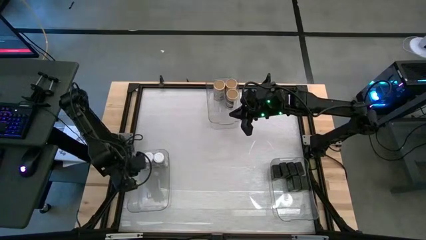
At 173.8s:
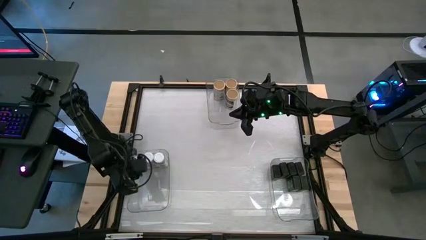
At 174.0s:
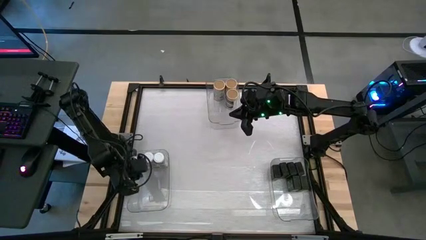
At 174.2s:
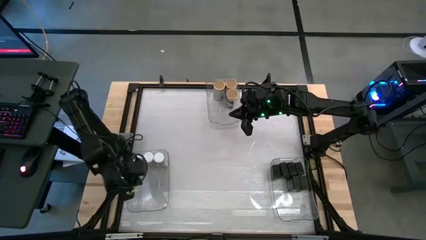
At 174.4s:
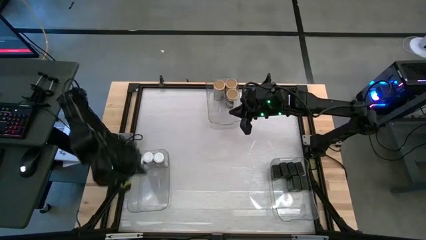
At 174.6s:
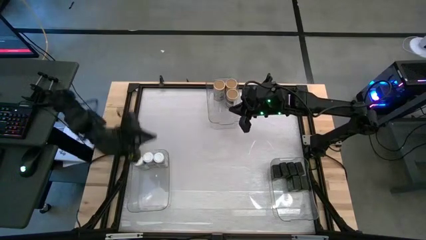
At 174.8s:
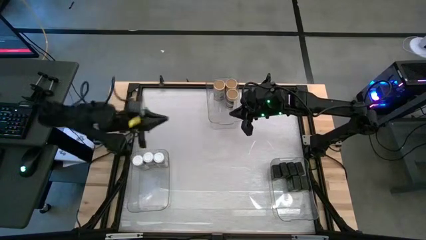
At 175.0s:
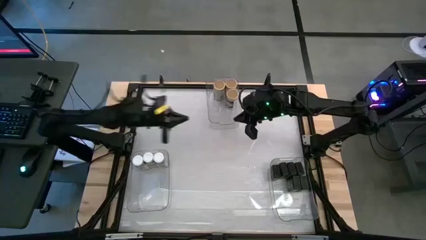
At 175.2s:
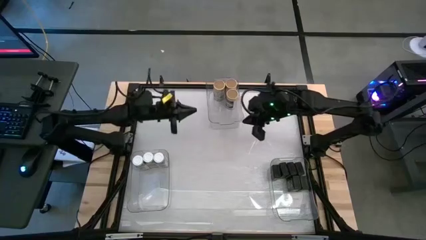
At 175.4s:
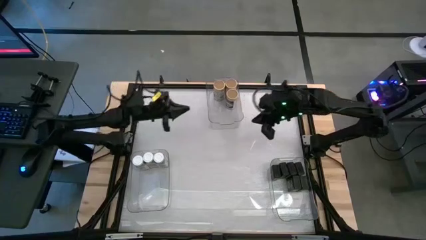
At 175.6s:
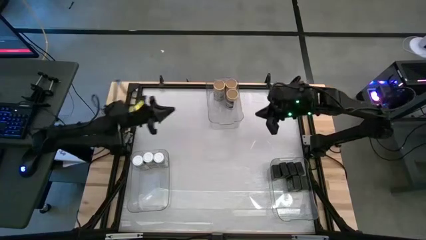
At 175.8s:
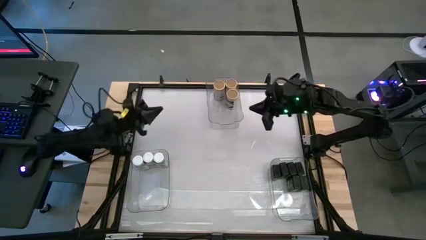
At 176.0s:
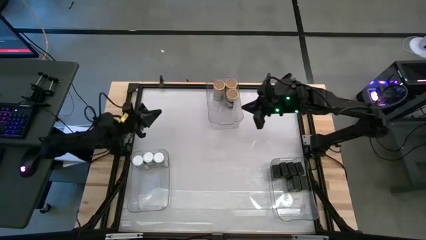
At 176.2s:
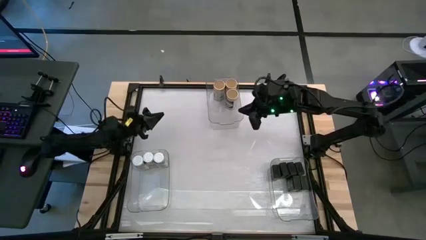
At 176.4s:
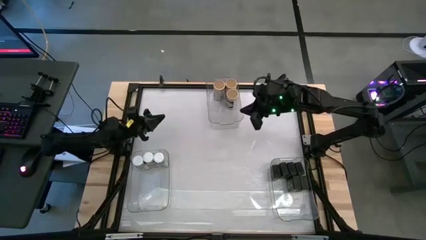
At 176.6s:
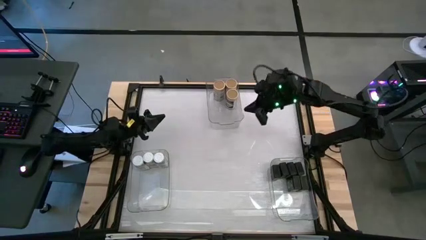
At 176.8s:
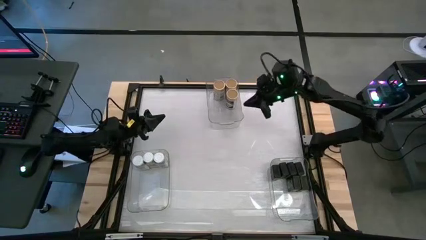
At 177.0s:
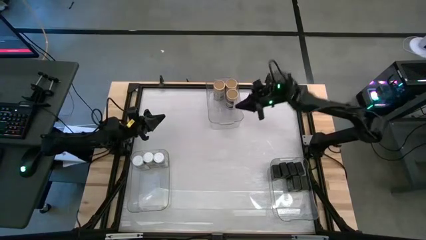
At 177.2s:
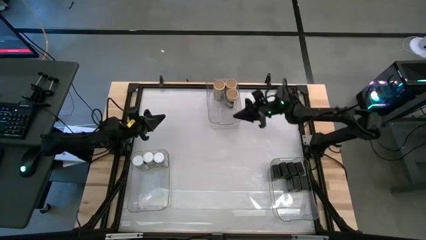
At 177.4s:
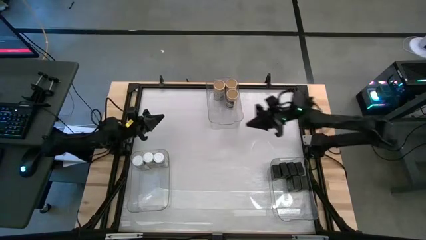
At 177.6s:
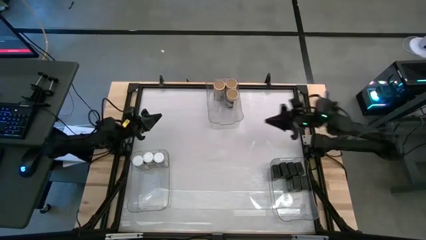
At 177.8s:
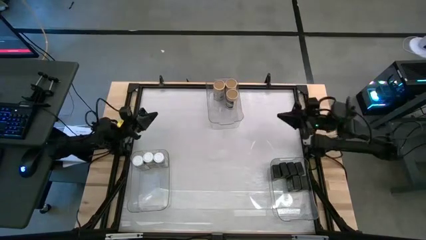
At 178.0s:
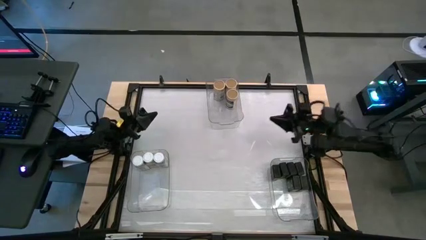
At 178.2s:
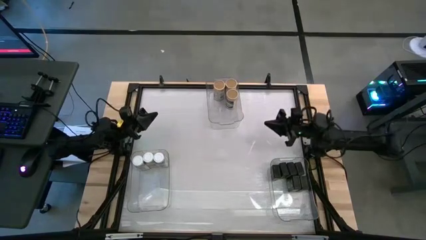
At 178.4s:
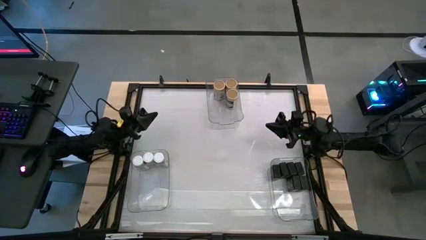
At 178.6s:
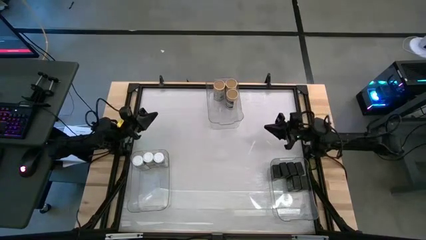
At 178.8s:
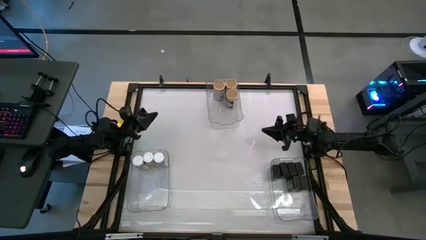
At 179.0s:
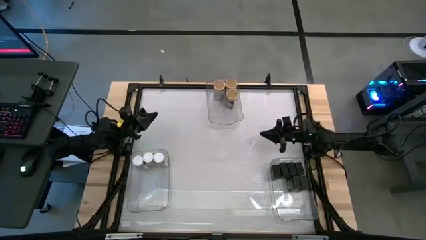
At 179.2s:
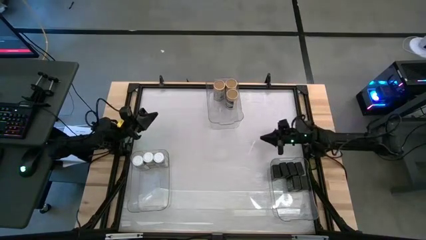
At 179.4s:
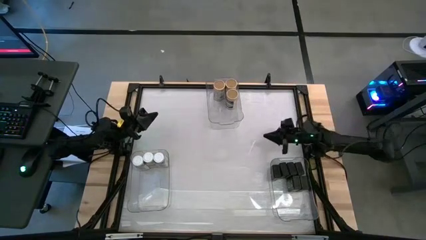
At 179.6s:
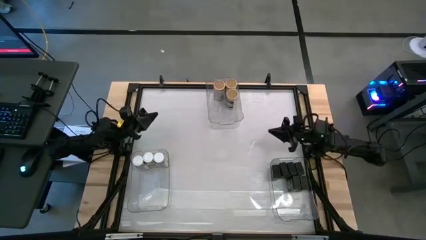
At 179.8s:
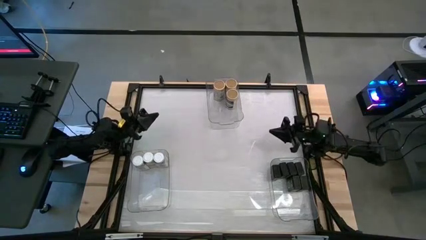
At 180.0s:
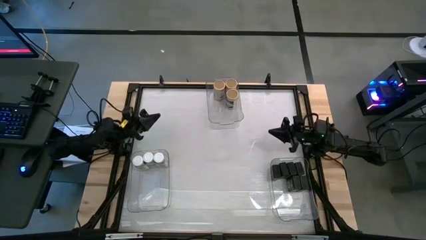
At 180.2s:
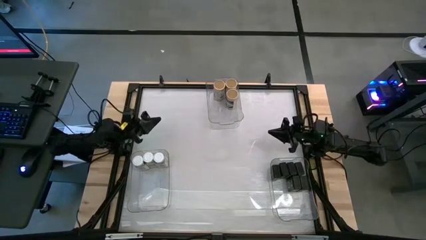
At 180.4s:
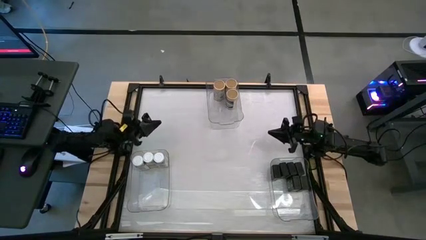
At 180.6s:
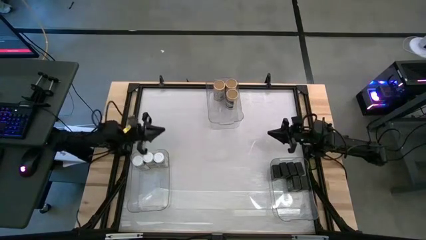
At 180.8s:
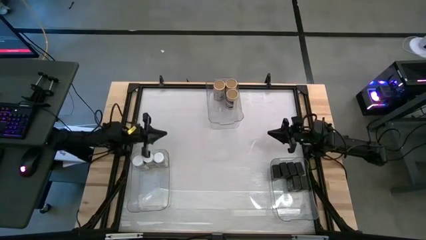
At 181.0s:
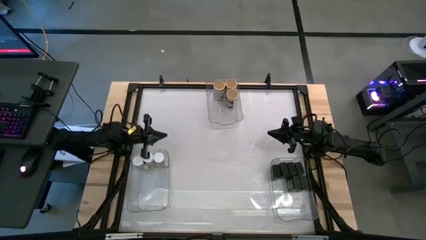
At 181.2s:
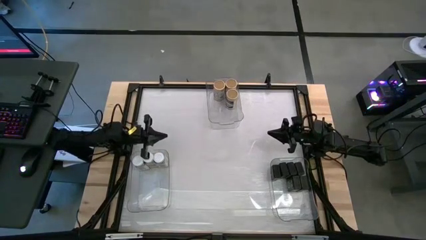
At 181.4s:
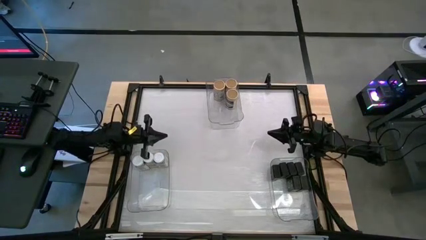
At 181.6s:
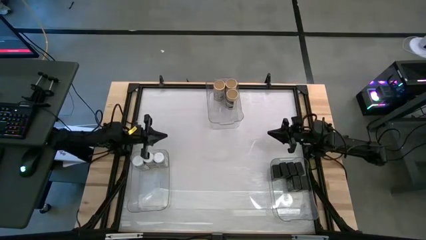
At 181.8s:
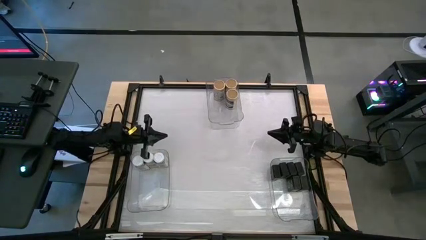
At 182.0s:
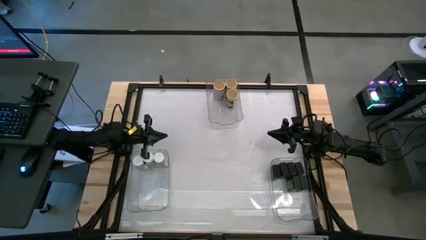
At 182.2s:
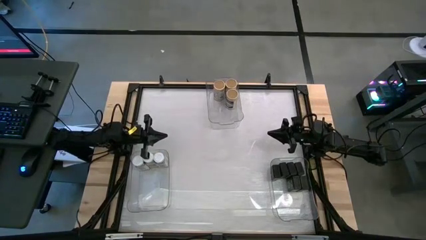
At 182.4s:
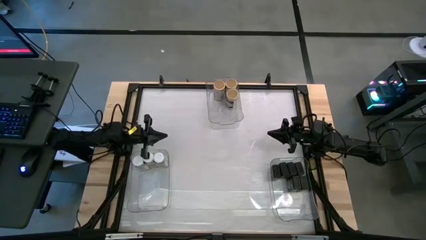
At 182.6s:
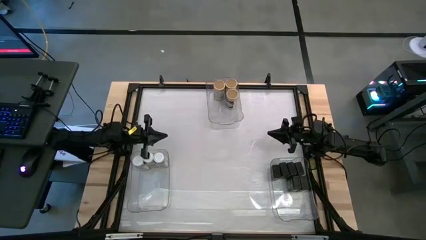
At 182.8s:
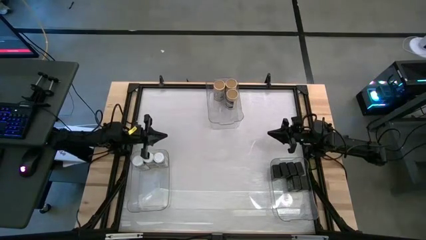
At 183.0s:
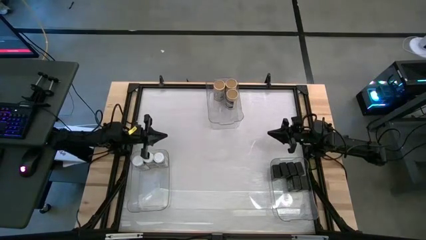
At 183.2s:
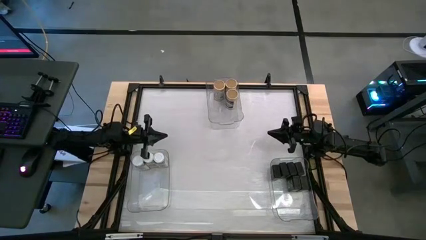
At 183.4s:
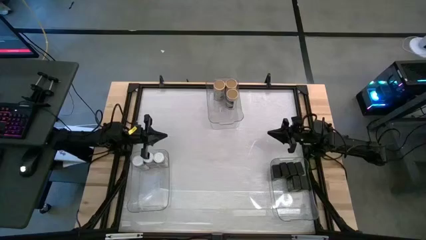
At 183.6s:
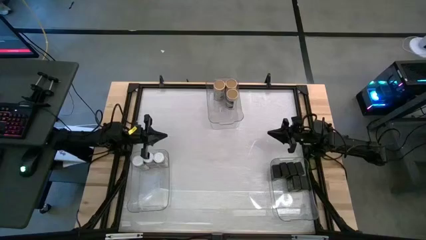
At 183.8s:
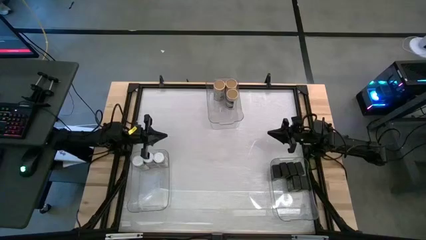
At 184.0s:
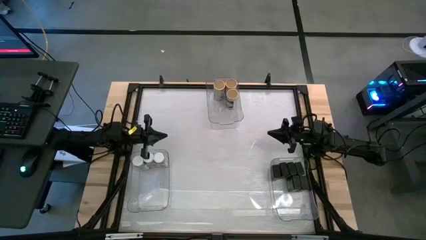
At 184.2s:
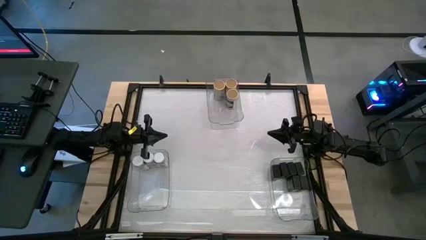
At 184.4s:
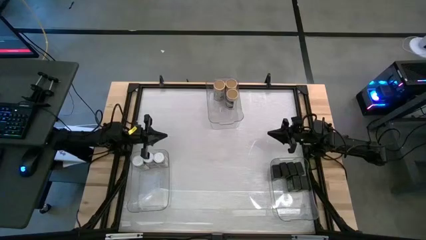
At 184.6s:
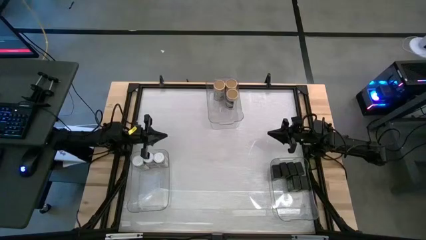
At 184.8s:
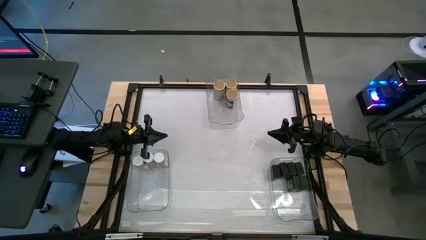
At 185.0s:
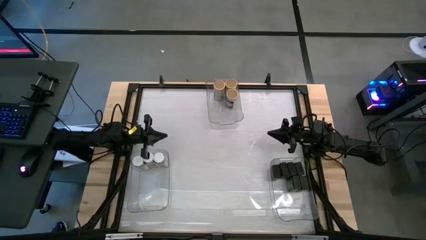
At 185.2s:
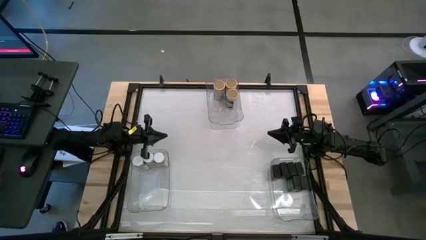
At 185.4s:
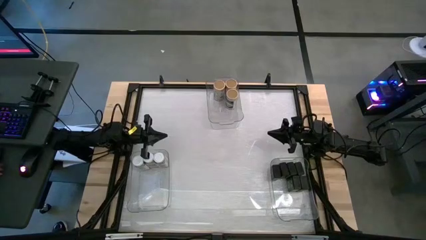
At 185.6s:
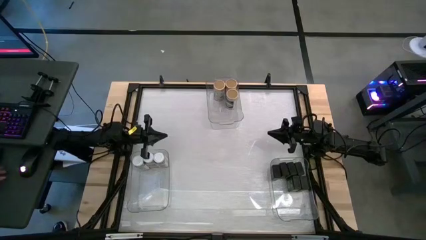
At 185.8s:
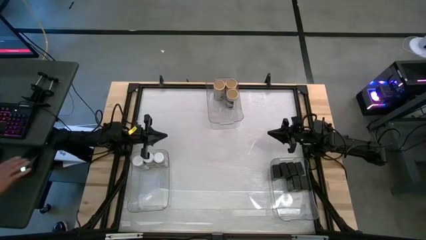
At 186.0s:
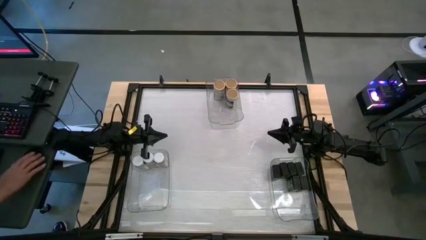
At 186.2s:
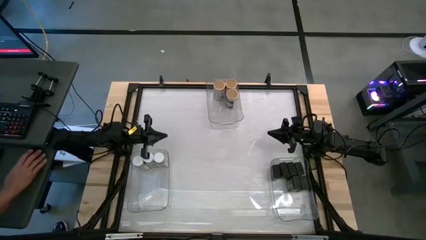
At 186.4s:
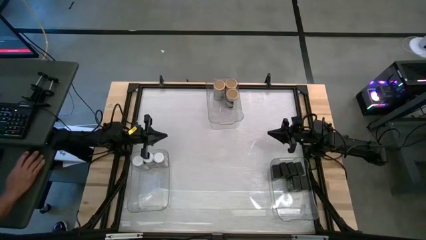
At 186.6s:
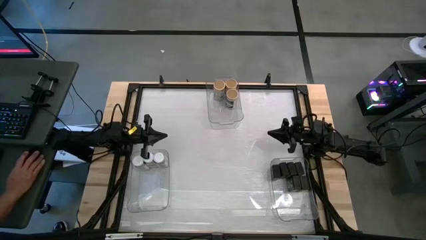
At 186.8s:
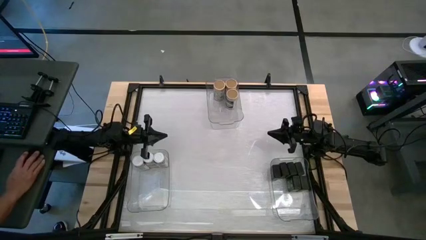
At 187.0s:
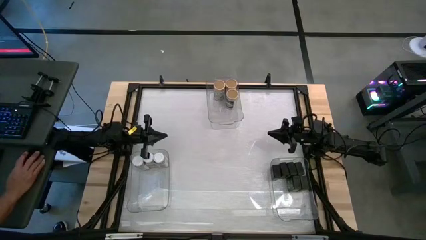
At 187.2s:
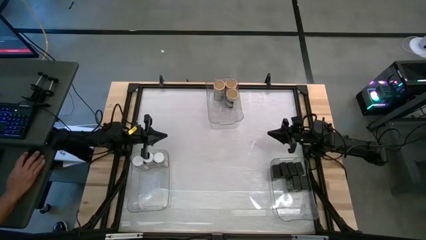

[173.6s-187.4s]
Task: Sort spices by type
Return to Home Position

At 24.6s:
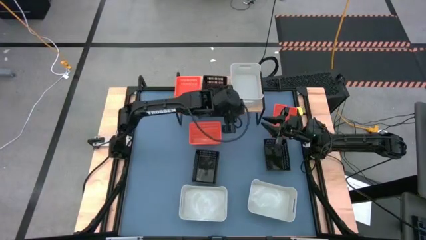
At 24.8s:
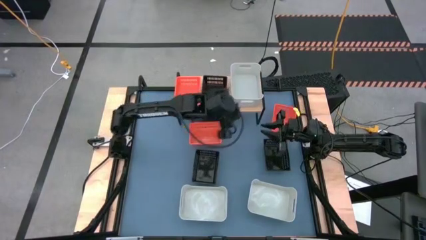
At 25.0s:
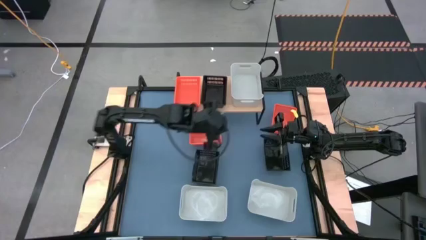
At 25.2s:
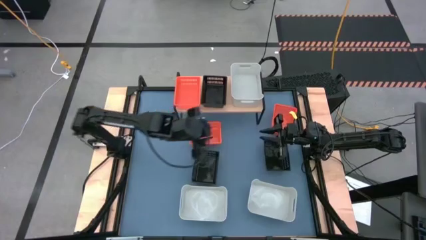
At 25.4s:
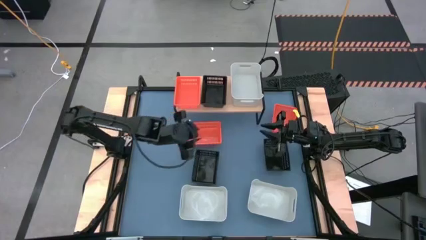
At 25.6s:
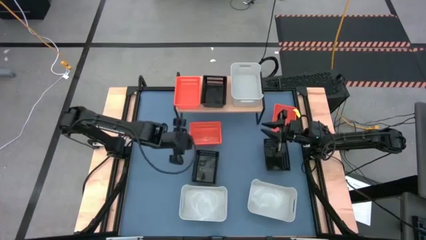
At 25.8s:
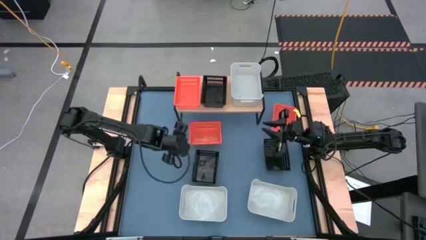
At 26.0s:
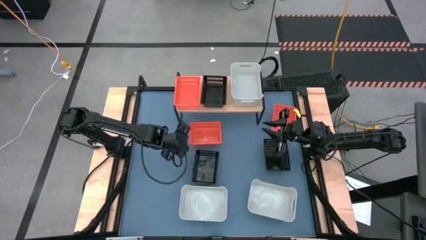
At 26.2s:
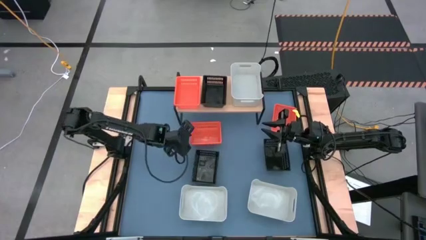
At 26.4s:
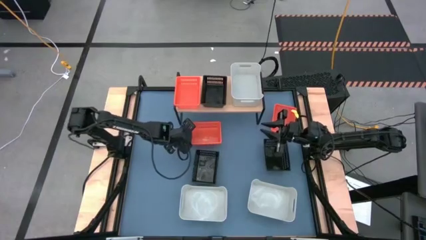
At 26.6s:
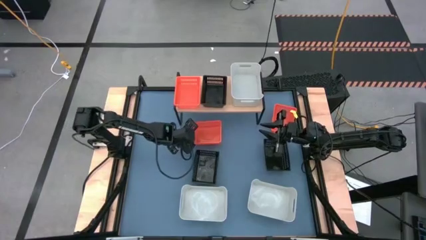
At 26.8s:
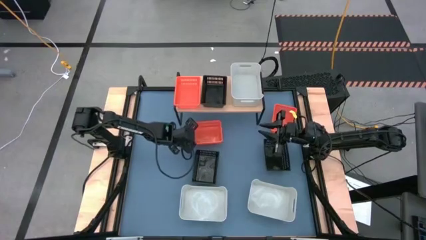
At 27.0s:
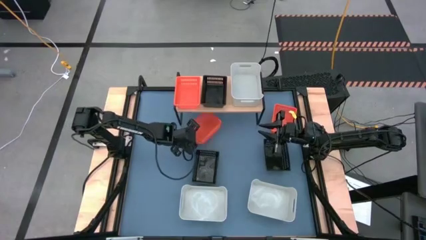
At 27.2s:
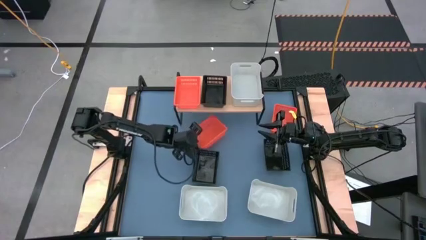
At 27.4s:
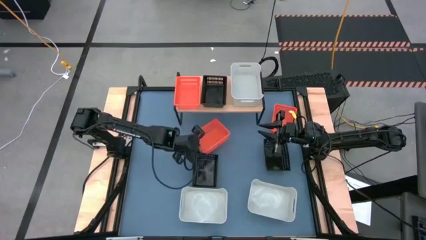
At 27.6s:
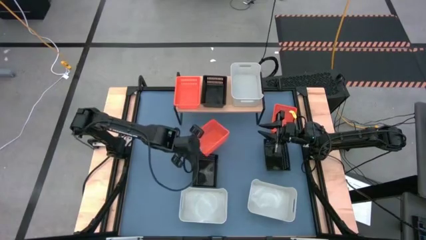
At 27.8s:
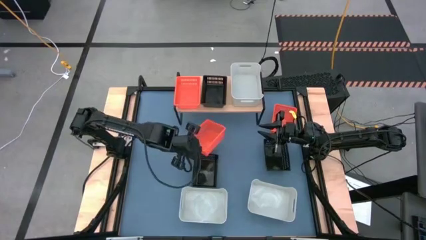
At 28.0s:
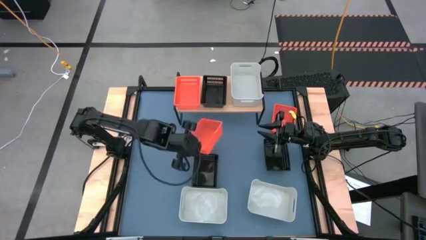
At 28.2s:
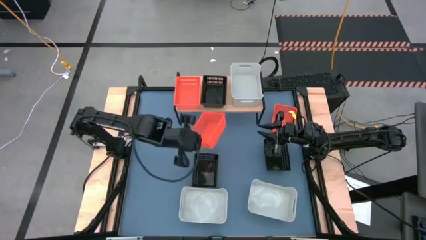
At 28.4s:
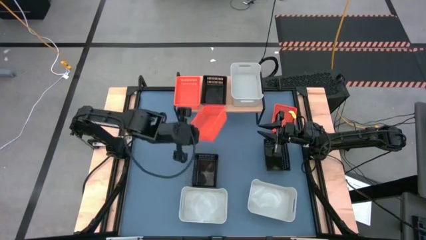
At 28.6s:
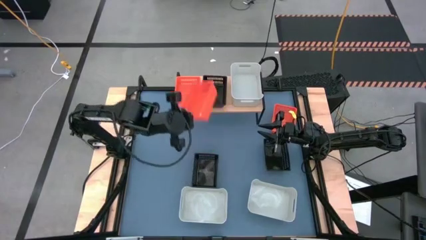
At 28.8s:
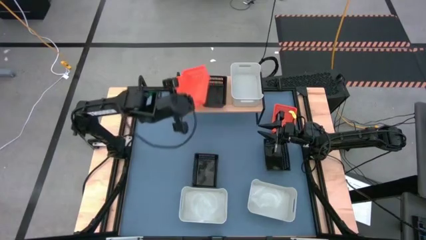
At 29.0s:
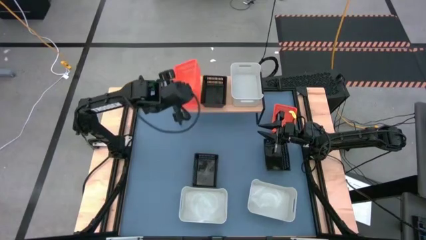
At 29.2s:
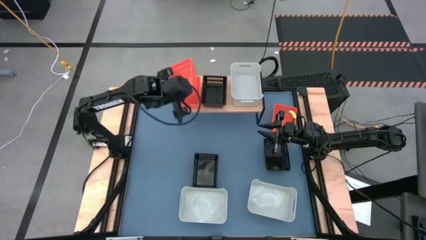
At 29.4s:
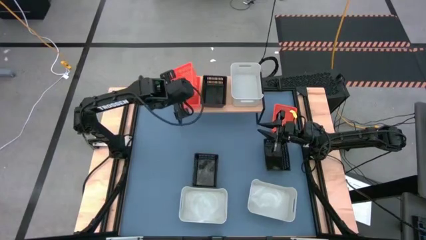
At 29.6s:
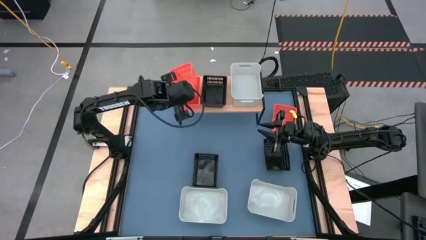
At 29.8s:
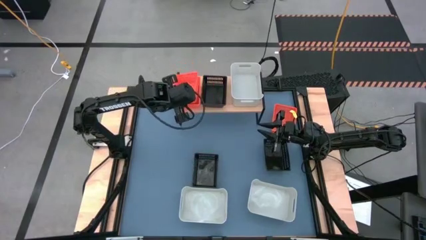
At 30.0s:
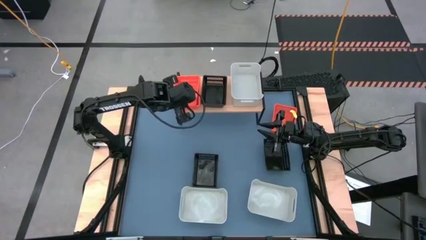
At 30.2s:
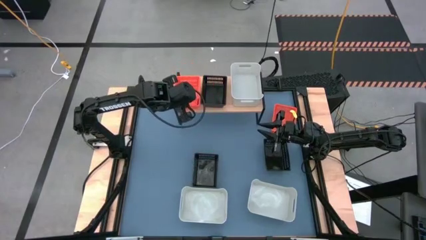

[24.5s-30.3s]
Task: Stack baskets on shelf by color
Stack the left orange bin on top of the other orange bin on the shelf
